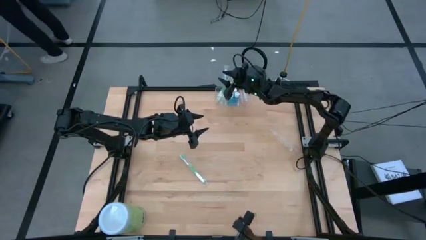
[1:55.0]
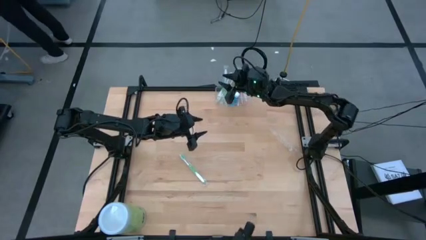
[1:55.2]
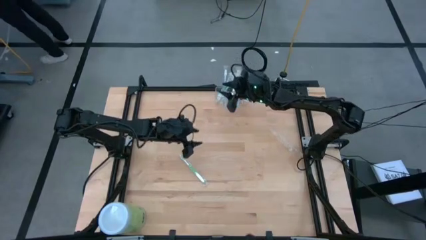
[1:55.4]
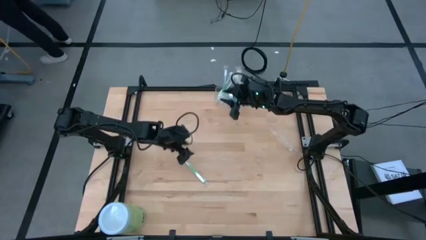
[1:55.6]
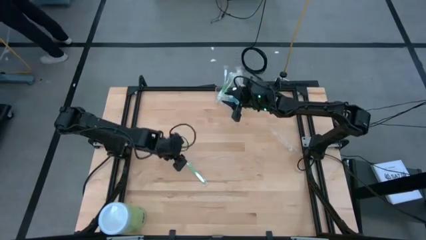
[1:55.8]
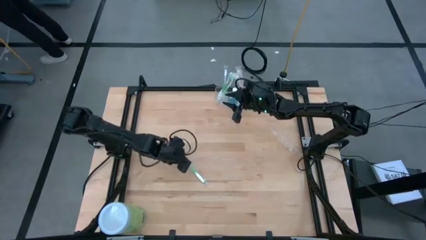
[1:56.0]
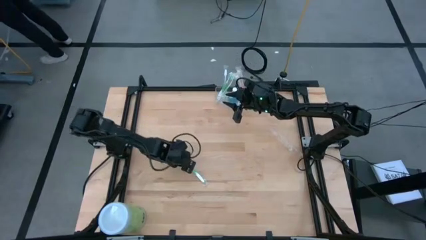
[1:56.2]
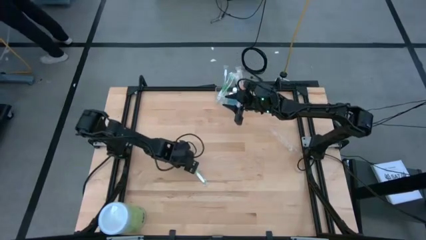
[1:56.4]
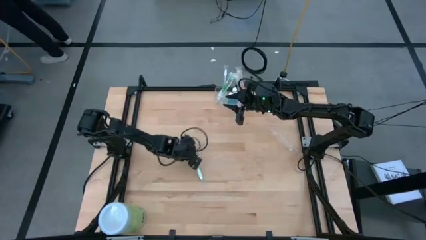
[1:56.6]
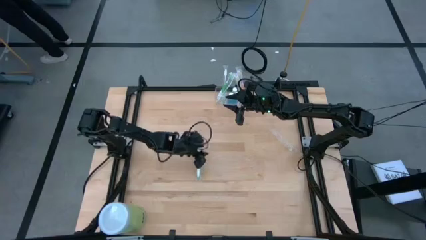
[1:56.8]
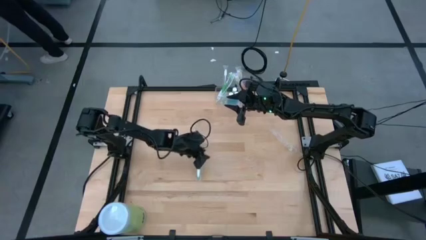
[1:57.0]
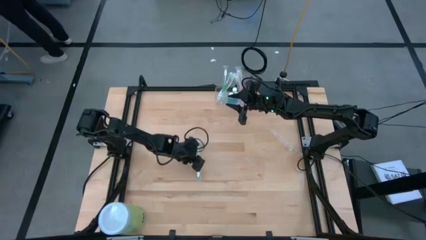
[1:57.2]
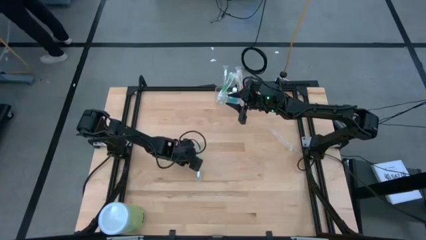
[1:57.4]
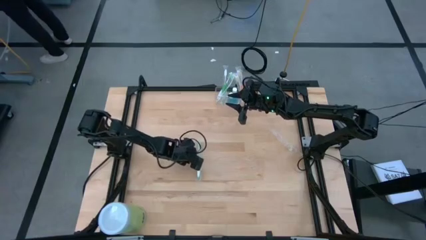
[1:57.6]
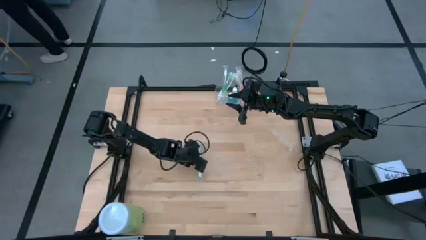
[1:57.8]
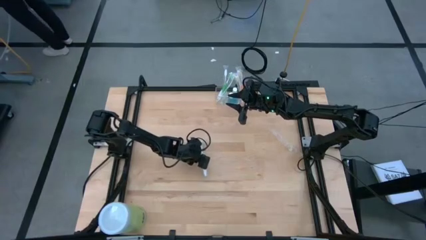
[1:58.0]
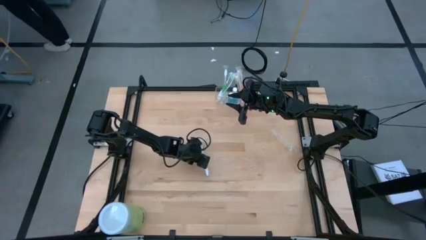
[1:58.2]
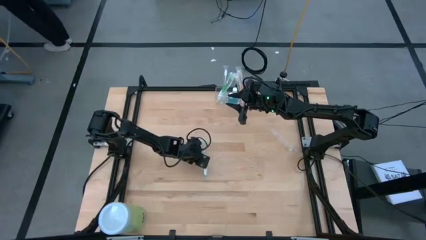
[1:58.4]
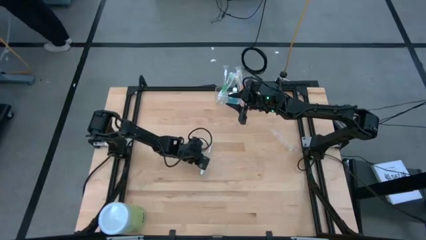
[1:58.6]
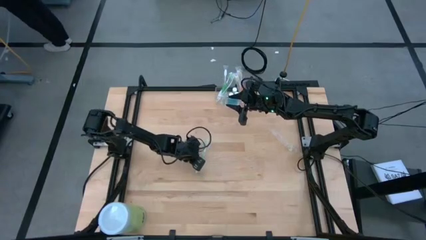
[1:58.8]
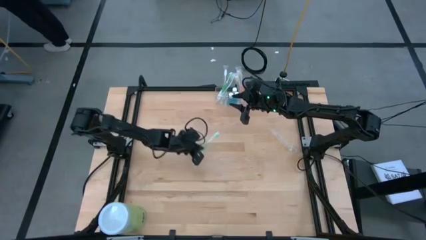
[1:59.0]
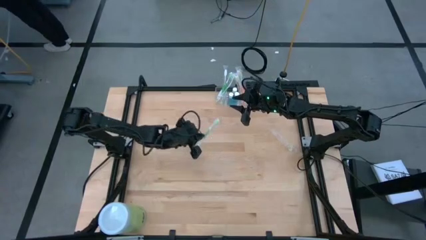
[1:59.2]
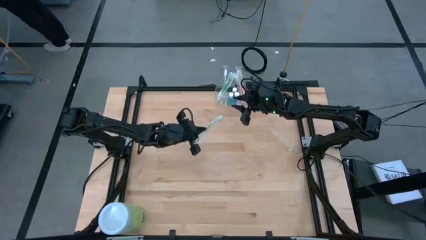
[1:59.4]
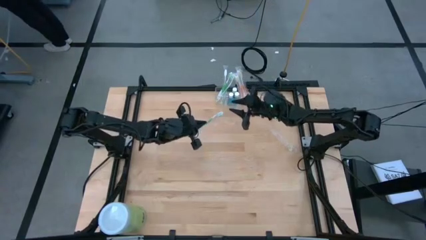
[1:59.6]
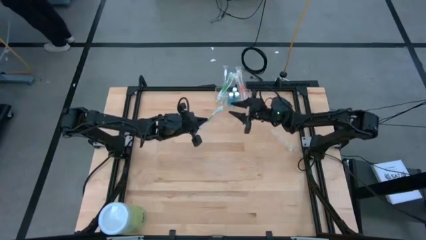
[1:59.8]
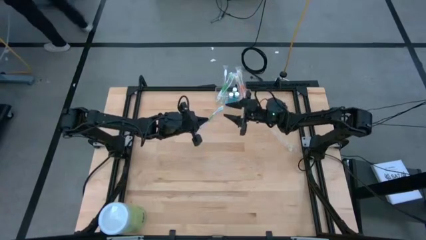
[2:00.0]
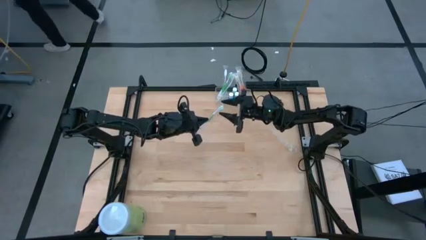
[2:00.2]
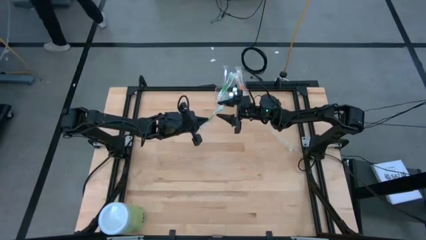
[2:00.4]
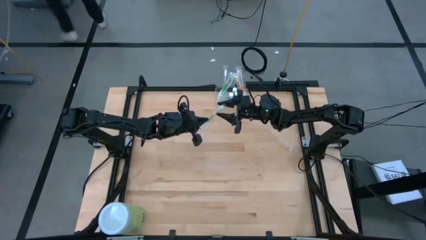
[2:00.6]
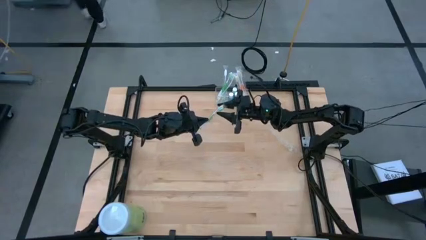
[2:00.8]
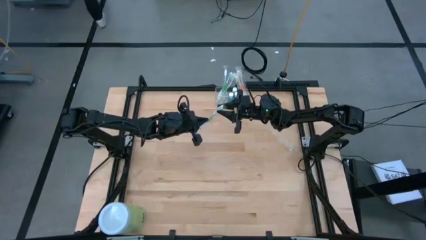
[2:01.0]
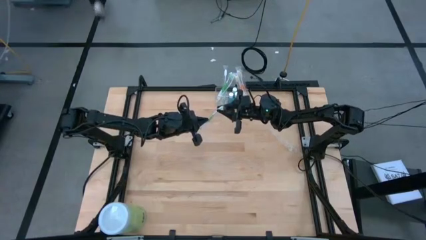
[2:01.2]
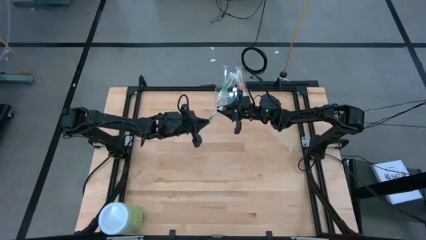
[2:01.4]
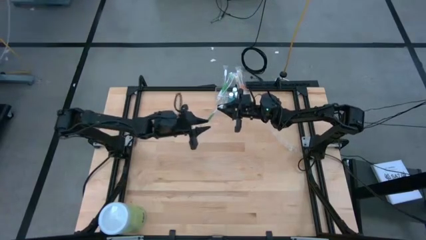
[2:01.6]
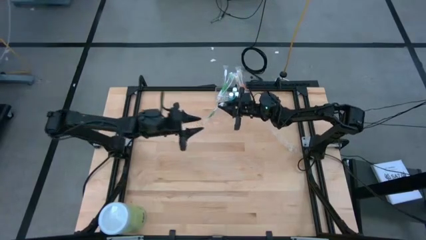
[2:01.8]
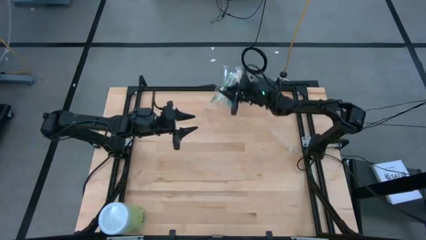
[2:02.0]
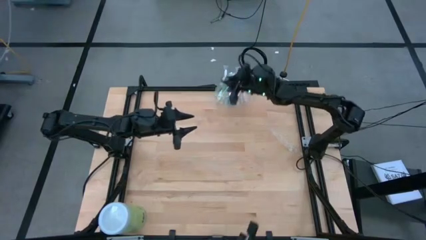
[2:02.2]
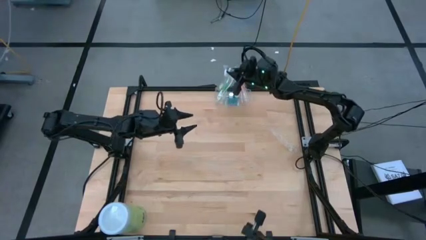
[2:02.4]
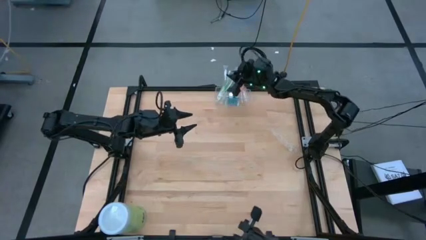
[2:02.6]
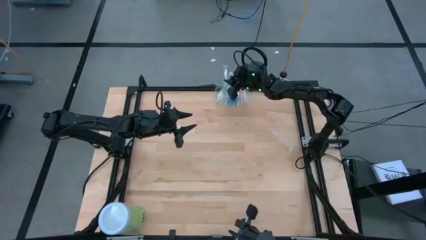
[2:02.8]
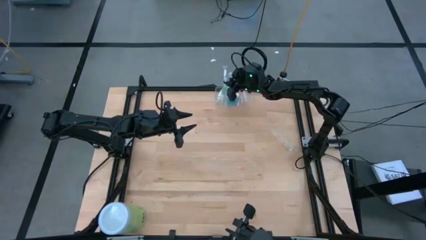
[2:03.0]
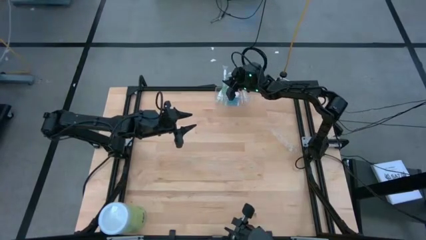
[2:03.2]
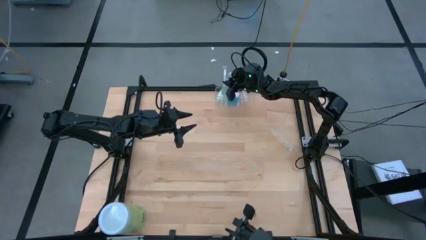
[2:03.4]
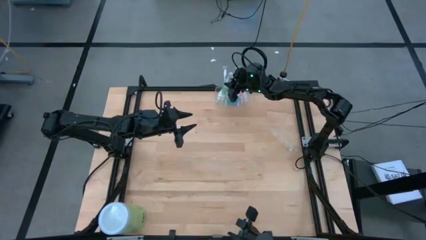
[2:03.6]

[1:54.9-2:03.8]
Task: Pick & Place toothbrushing station
Put the green toothbrush into the transparent organizer

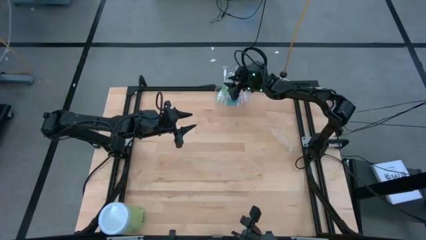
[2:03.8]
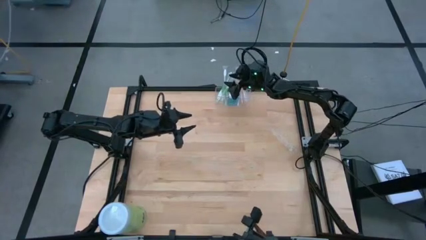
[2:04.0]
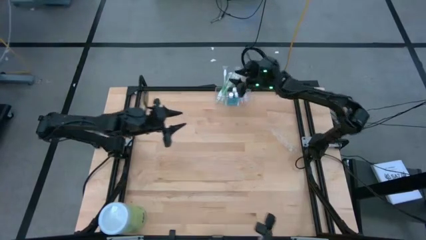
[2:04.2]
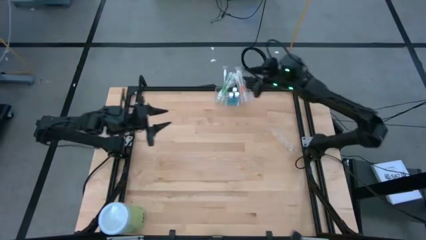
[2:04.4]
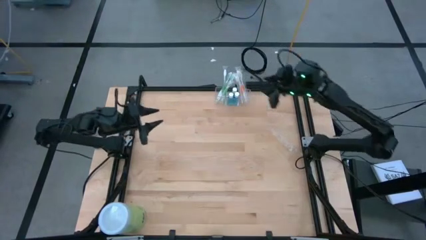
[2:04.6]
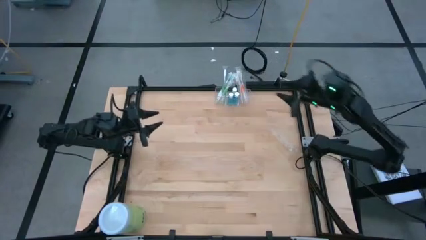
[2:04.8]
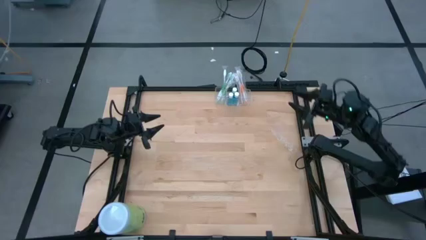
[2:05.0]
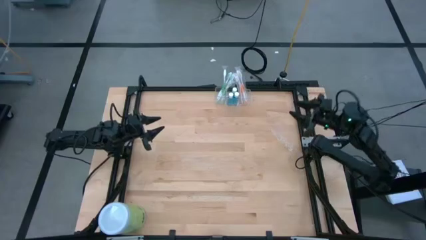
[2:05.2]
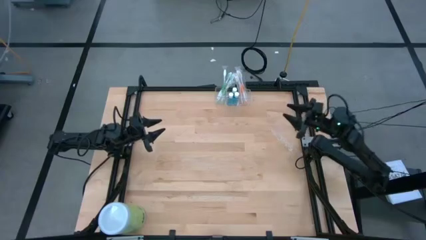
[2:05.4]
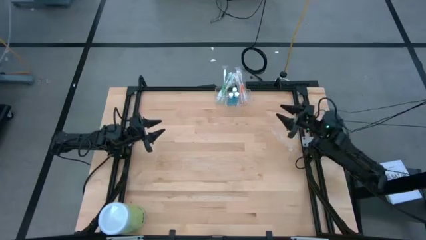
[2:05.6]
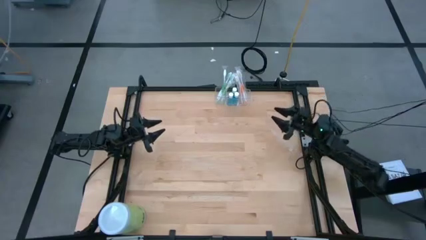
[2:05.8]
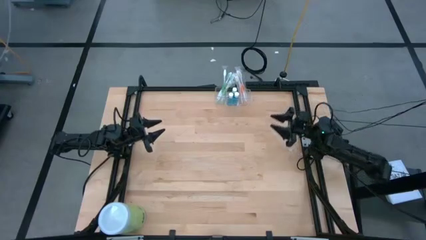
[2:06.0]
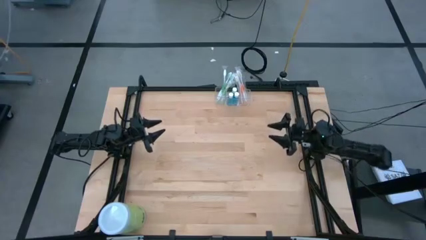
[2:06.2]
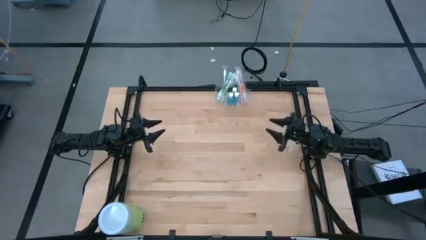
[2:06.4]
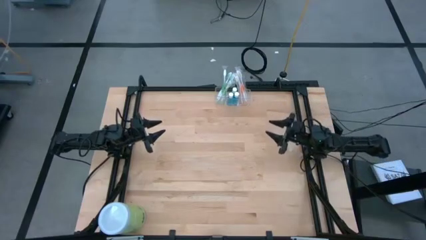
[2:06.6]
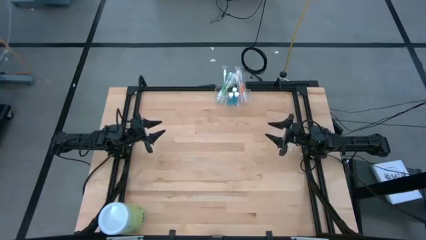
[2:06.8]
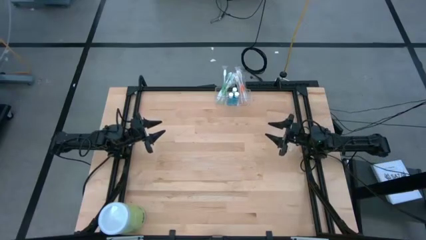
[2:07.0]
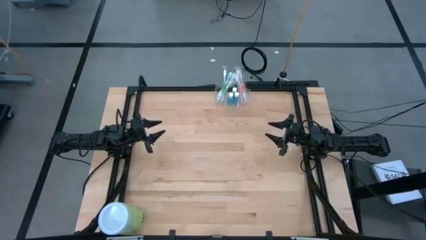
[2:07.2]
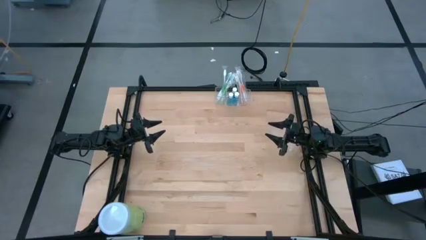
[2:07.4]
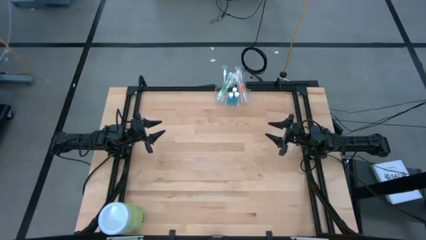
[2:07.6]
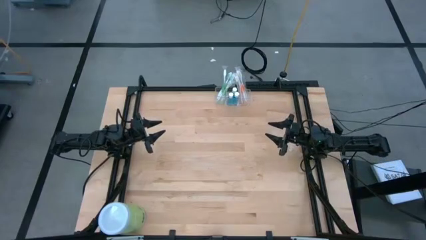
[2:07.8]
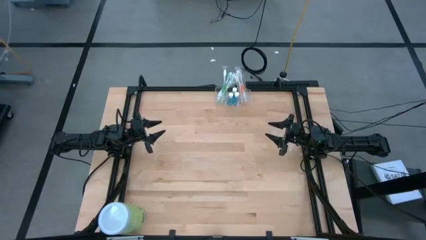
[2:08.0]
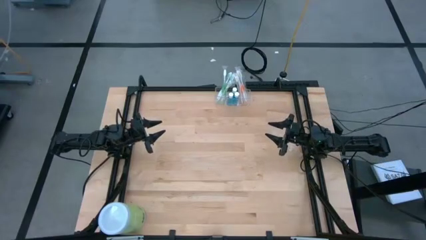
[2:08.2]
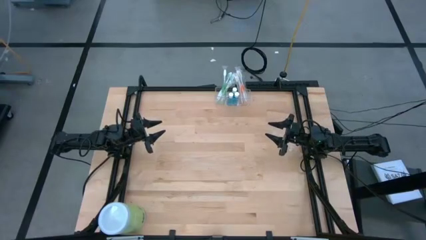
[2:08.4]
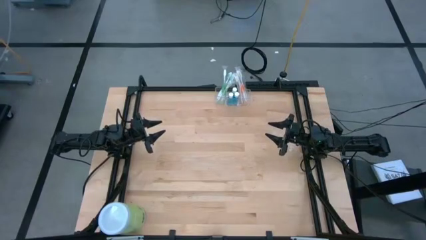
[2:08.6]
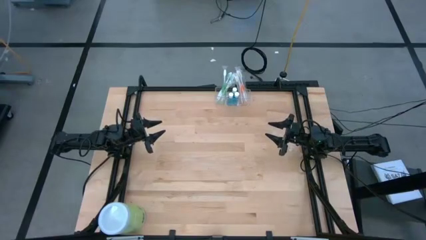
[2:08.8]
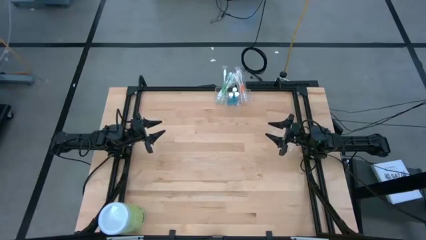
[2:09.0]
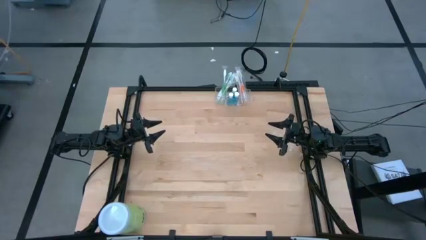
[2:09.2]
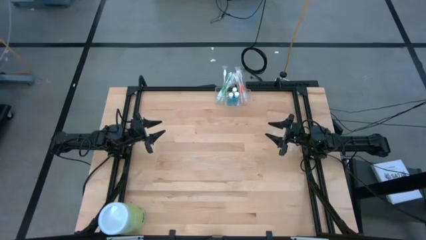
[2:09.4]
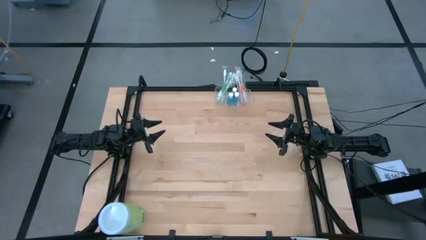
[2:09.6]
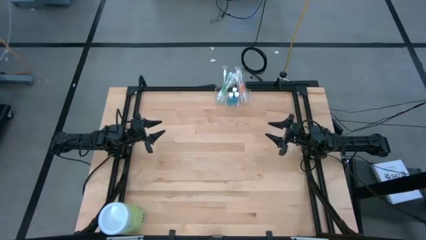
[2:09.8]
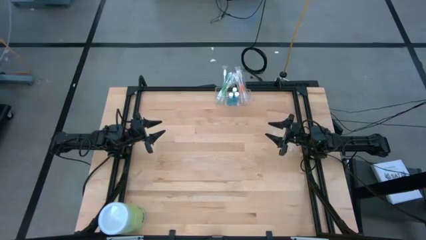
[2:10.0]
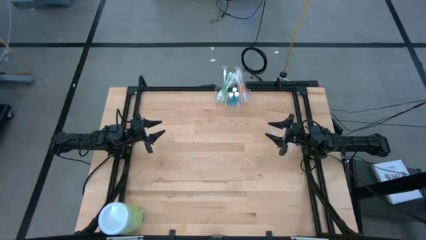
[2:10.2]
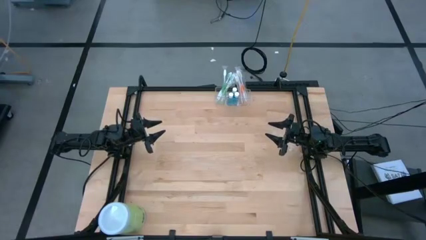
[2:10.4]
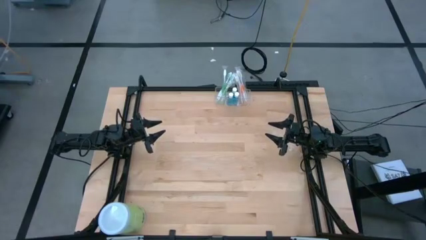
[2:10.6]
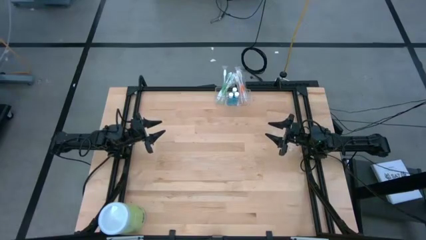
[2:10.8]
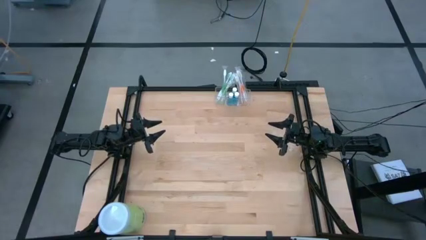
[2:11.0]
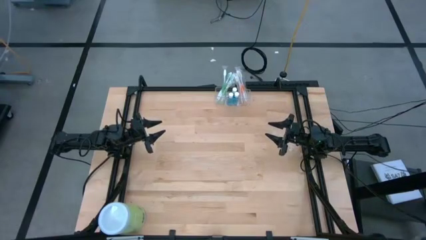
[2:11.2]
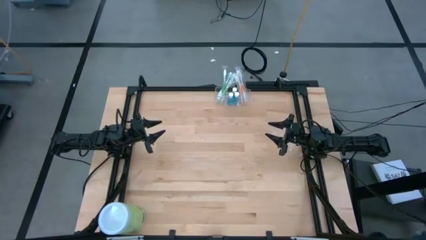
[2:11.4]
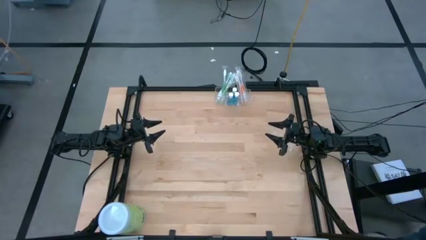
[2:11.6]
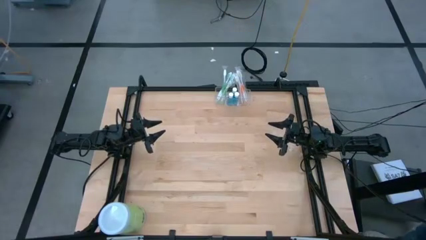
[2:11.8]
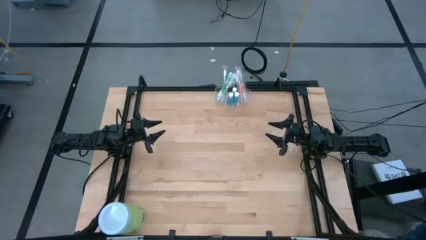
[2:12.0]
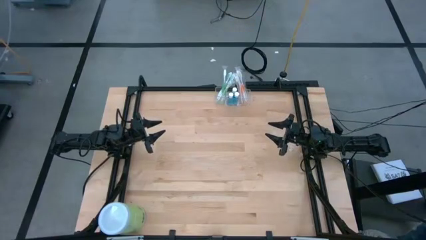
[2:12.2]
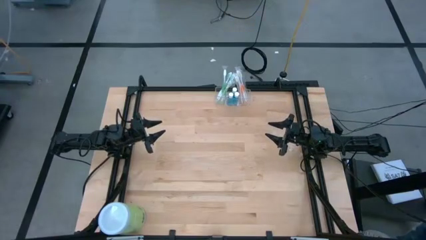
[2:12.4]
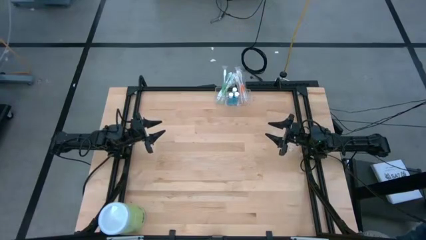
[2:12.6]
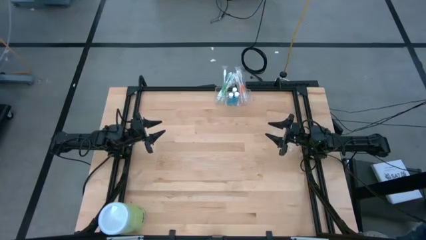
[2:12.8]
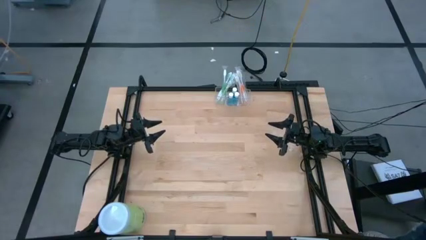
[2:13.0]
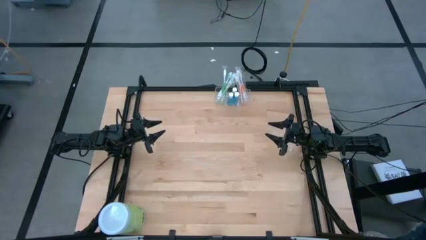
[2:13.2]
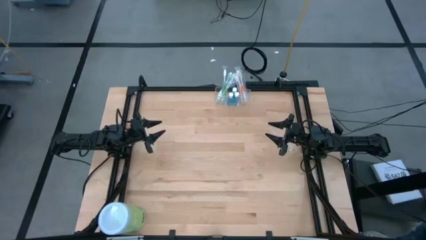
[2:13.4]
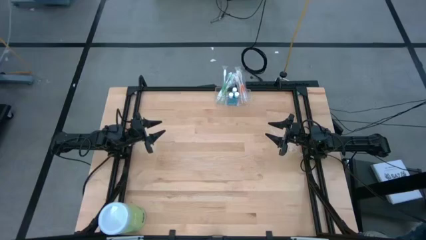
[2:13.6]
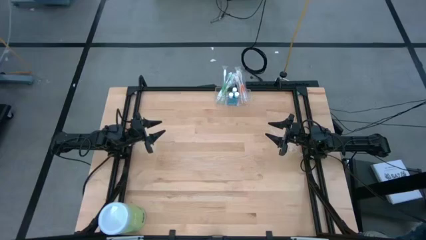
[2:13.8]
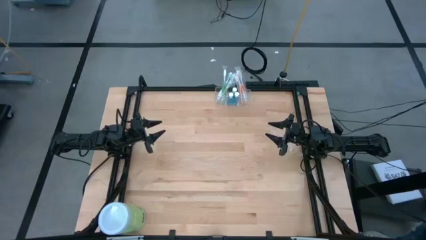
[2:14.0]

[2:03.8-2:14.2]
Return to Home Position
